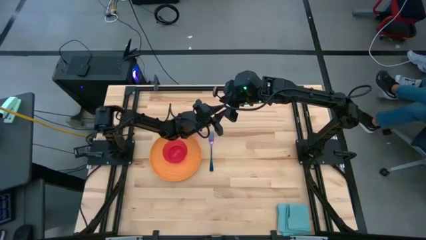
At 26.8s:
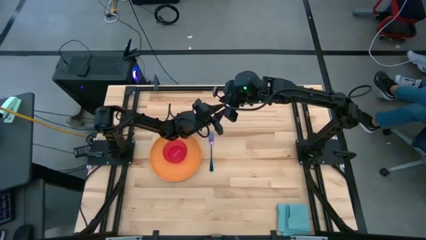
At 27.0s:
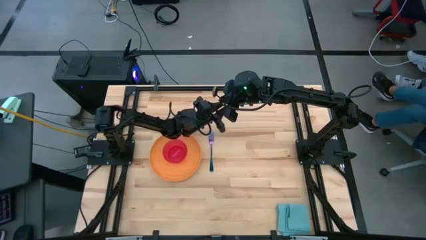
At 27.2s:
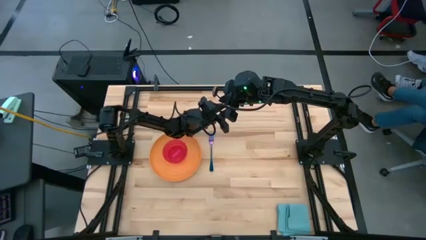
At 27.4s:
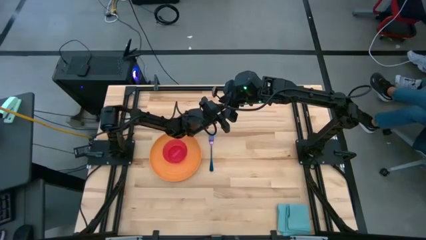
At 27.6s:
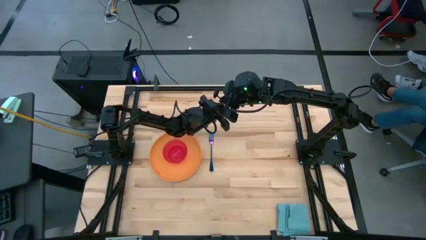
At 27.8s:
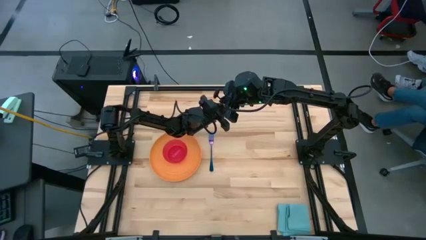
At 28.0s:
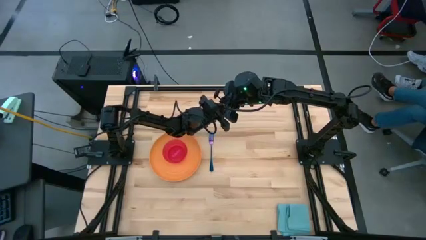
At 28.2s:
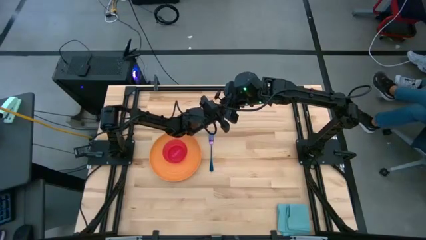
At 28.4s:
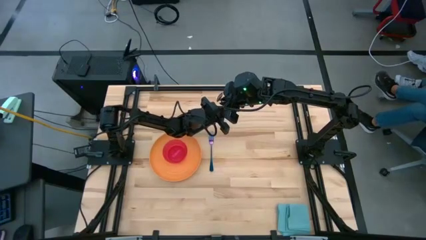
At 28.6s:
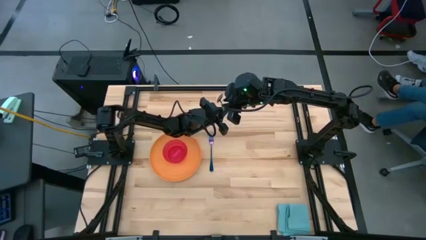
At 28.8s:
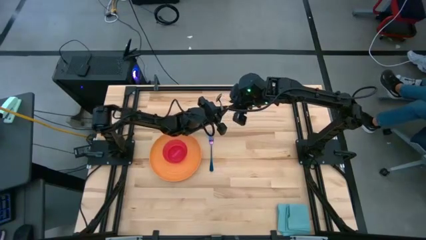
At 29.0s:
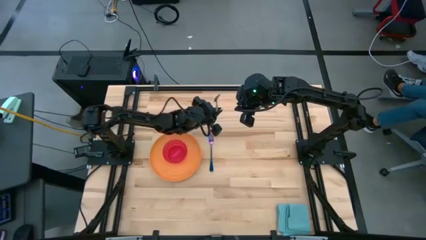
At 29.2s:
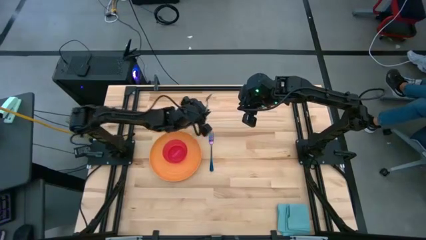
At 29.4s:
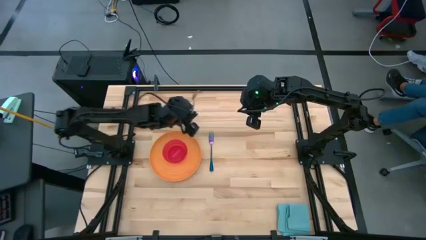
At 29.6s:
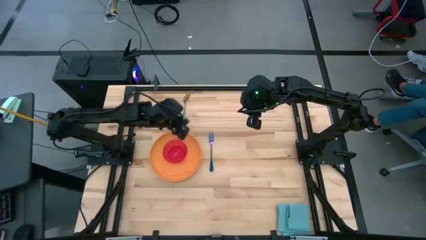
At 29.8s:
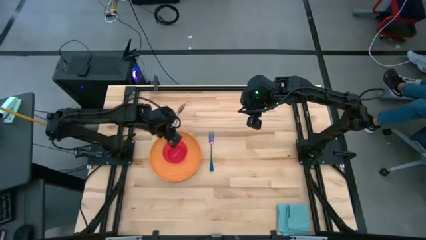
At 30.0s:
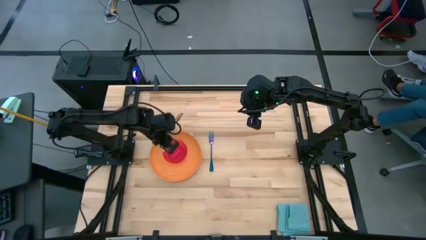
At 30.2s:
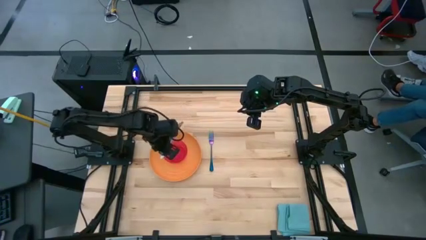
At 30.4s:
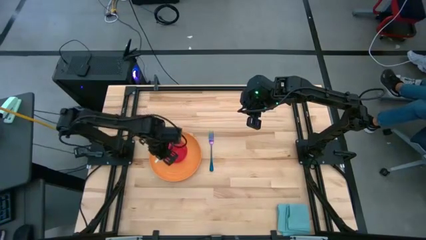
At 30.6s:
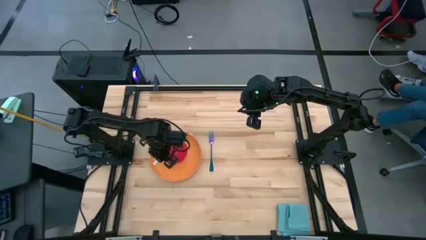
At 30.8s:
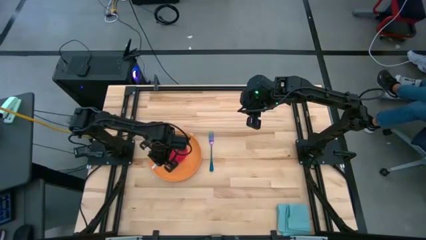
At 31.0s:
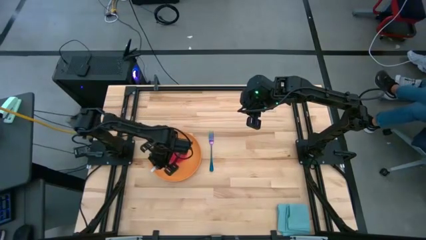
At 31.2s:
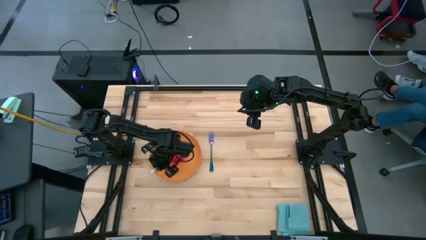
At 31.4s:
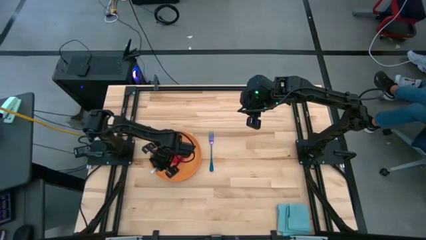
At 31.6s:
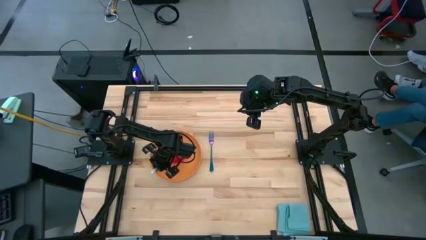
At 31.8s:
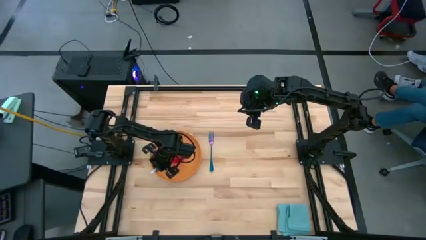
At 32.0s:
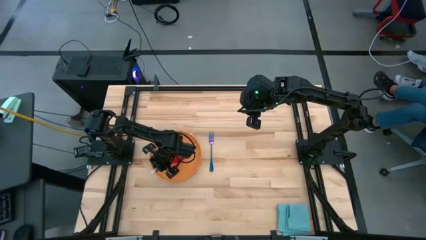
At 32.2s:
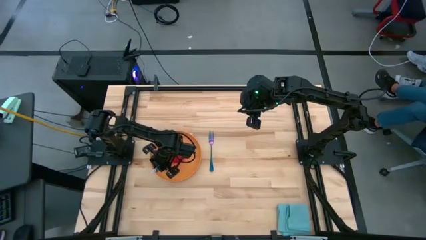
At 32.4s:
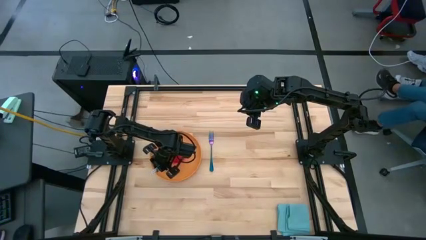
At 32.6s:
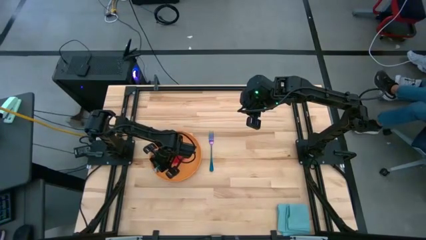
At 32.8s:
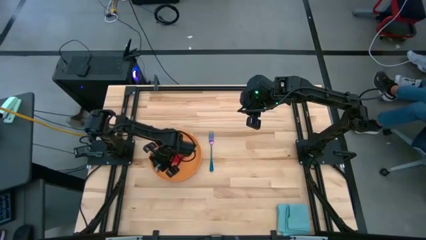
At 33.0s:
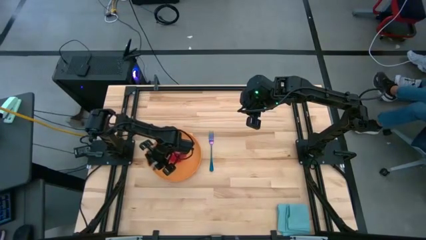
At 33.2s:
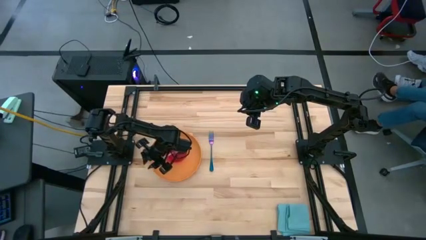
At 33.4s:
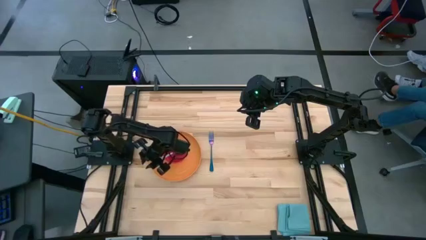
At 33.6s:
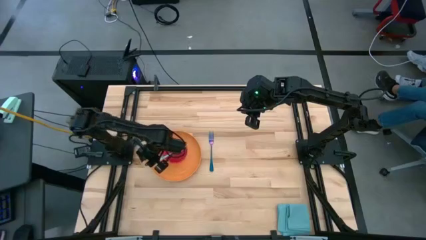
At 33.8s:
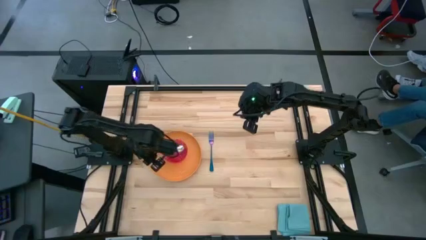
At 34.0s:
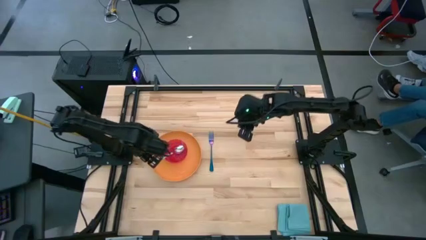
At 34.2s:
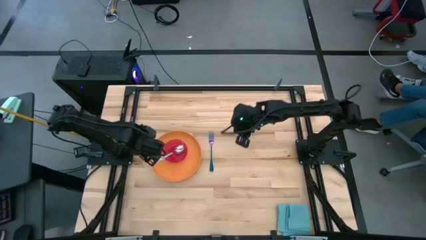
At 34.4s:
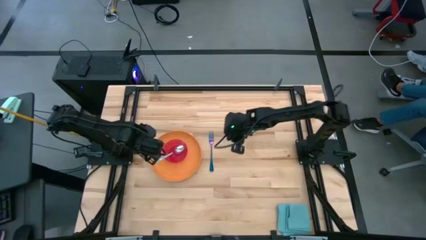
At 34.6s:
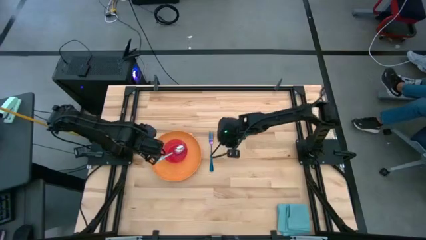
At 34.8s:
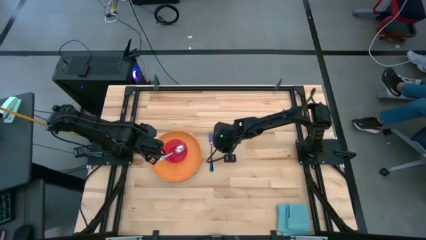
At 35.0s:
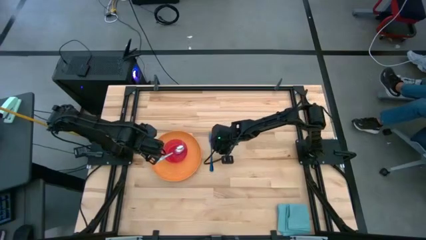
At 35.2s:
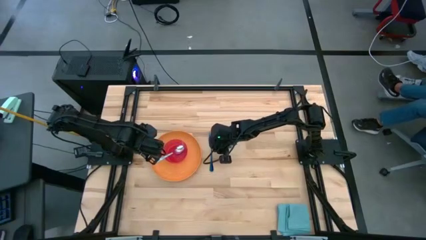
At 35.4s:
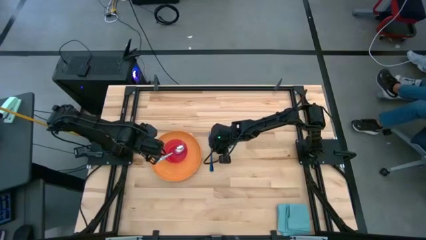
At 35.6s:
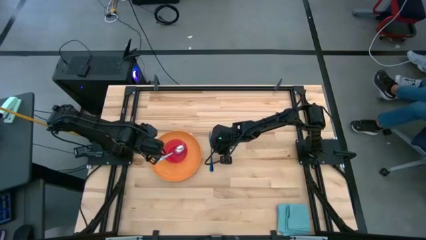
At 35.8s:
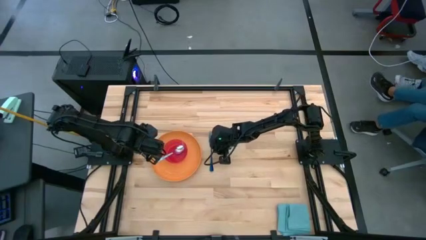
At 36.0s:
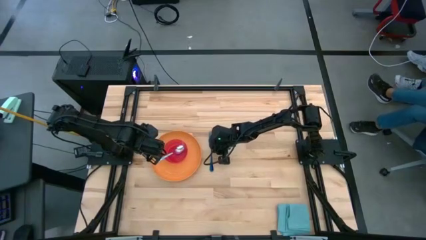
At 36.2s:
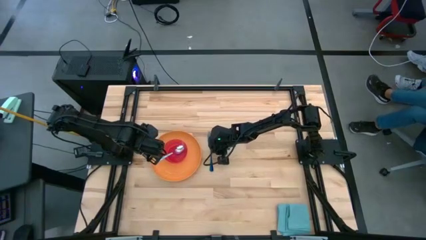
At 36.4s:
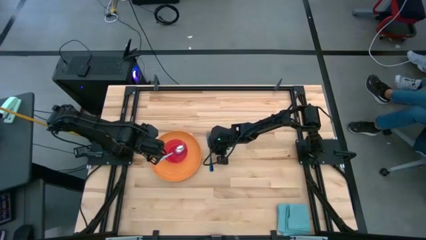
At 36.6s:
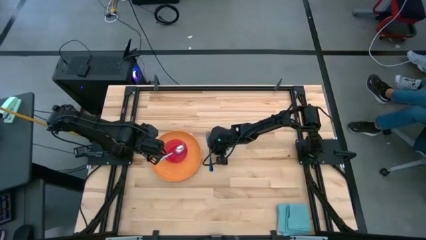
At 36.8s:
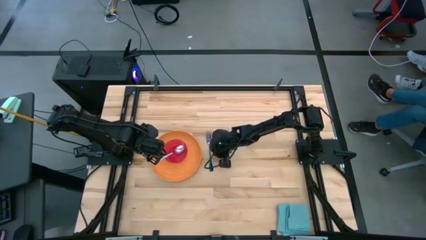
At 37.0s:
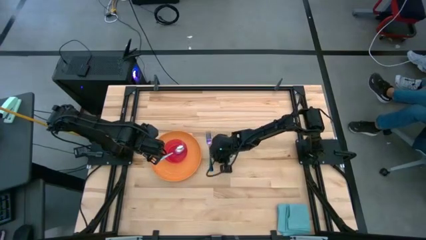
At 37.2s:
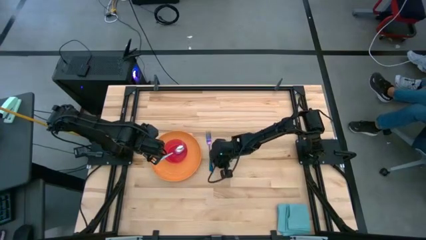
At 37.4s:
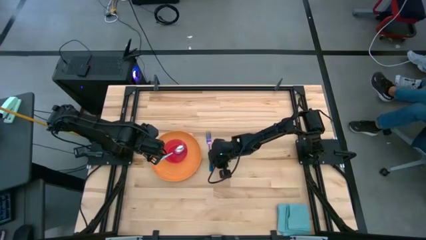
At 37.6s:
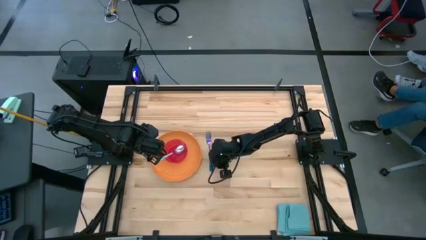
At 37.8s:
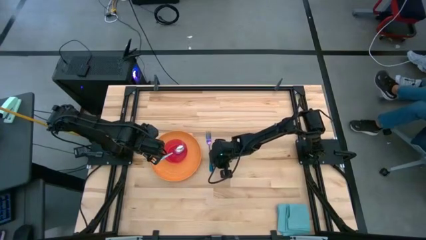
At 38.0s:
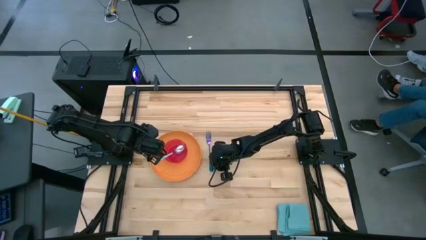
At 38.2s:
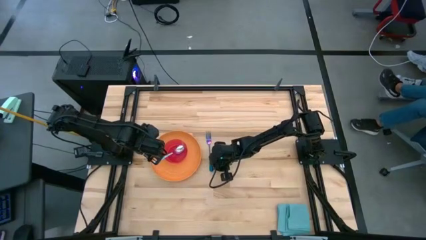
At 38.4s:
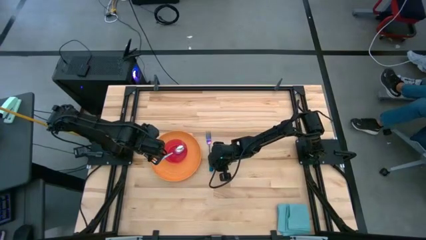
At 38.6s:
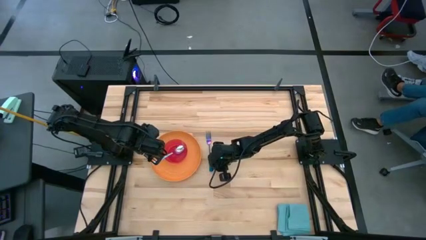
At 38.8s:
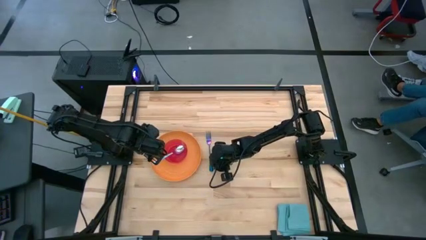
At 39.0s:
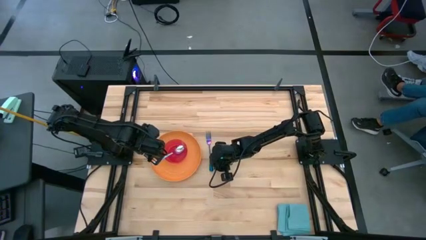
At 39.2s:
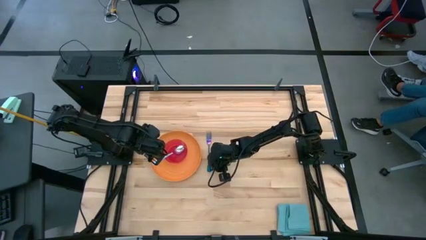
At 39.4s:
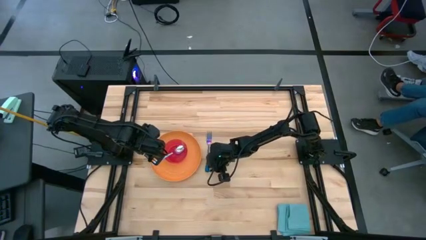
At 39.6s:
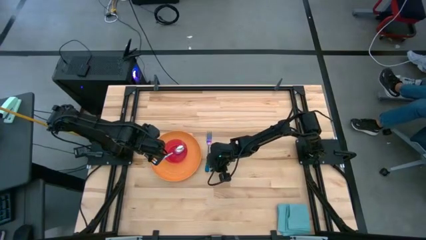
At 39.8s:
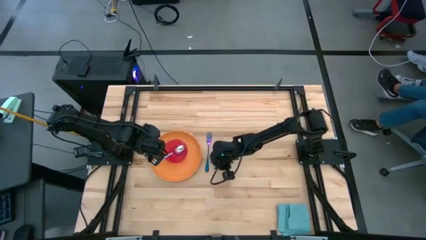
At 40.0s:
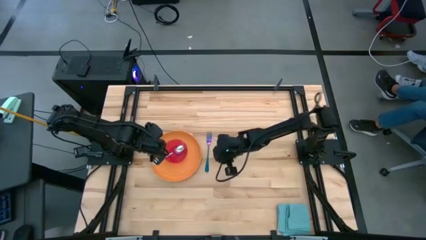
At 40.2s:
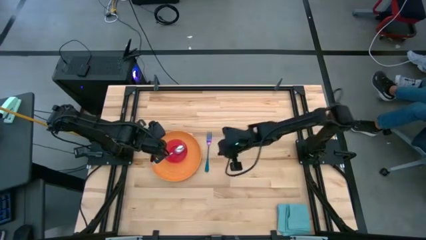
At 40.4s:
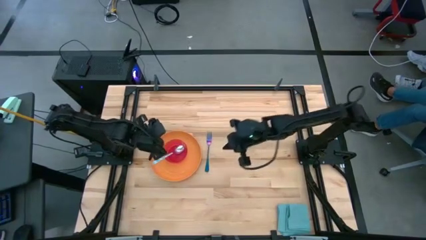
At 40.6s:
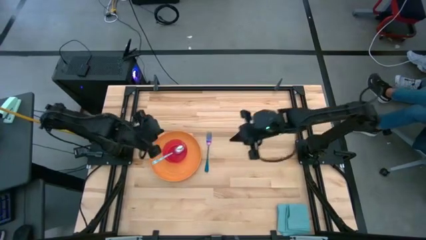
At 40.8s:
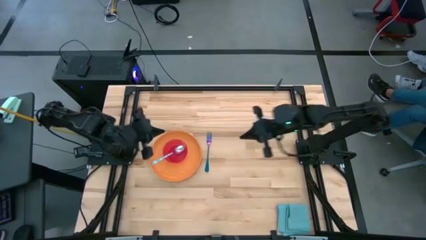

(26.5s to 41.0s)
Task: Set table place
Place the metal spoon into the pink bowl

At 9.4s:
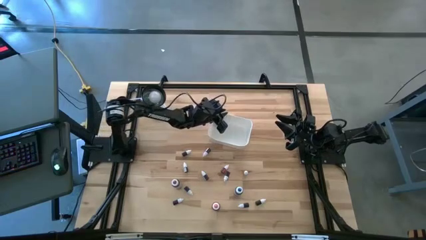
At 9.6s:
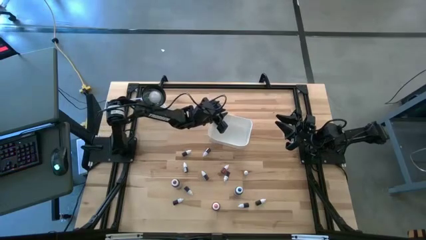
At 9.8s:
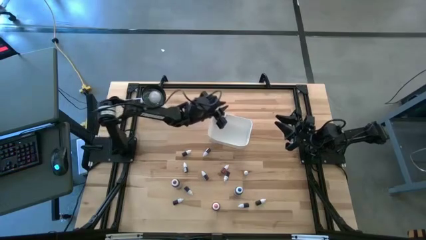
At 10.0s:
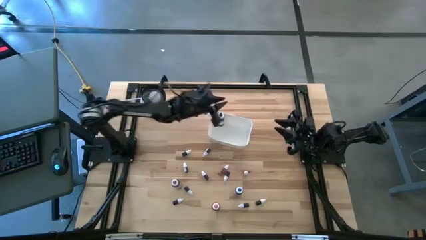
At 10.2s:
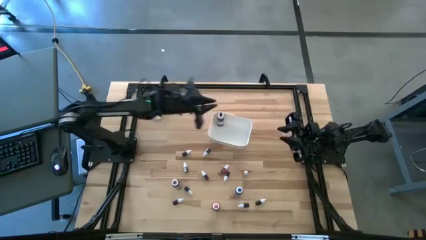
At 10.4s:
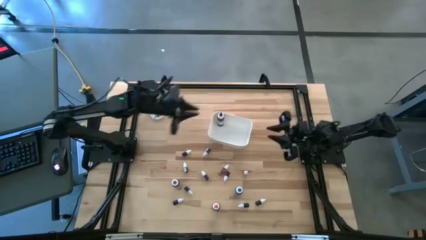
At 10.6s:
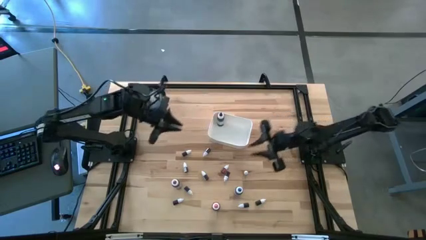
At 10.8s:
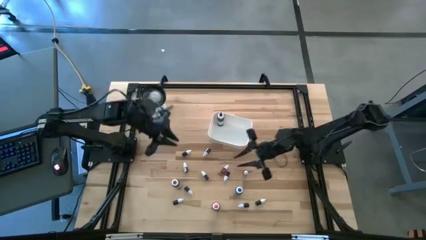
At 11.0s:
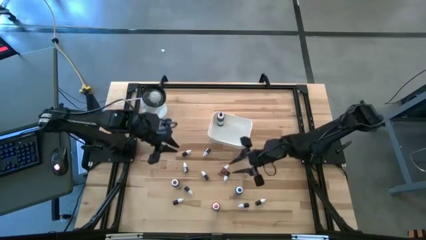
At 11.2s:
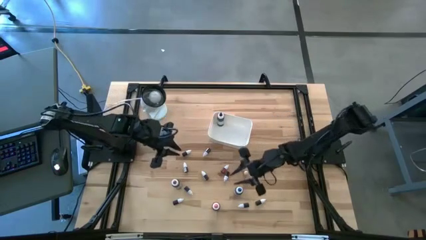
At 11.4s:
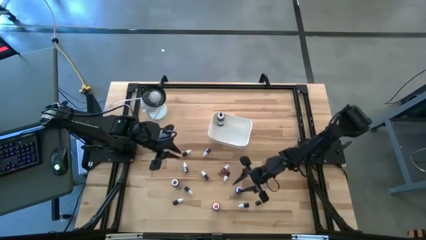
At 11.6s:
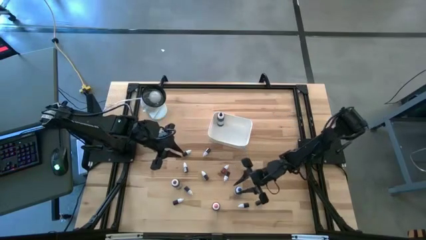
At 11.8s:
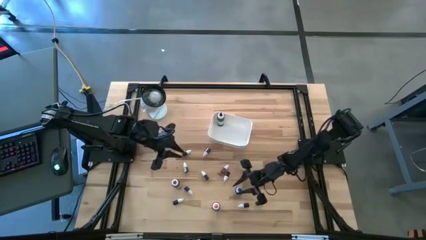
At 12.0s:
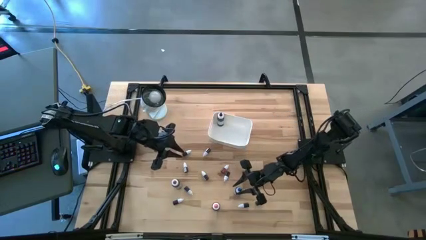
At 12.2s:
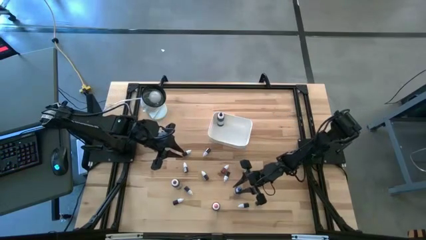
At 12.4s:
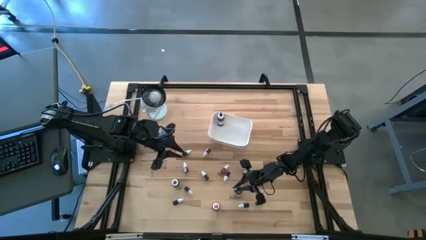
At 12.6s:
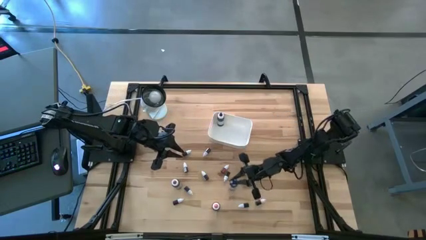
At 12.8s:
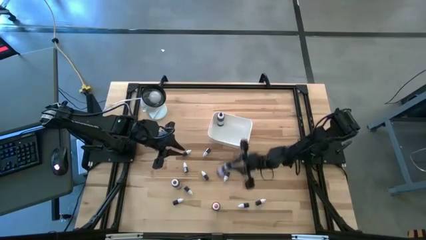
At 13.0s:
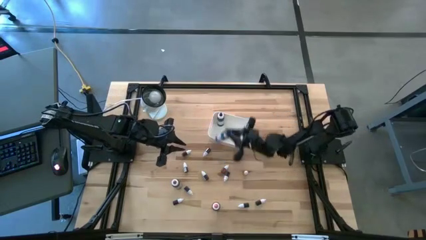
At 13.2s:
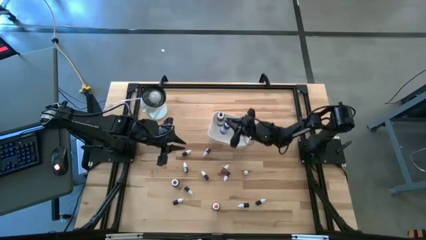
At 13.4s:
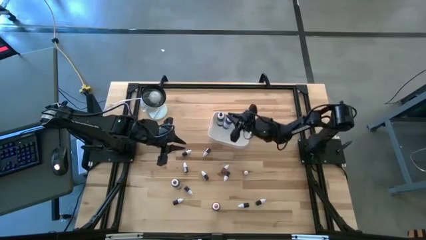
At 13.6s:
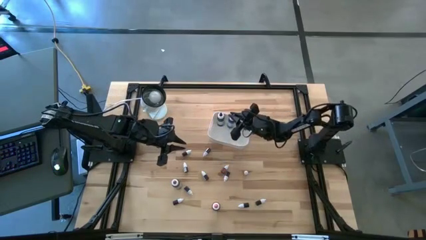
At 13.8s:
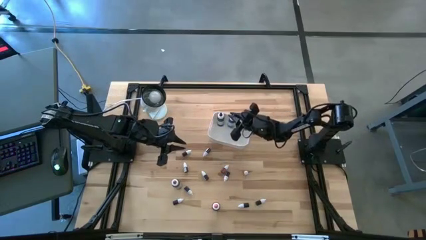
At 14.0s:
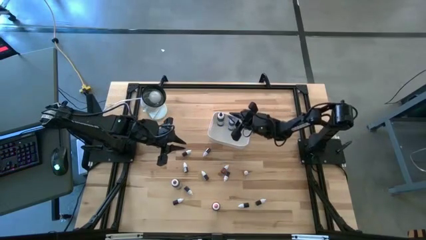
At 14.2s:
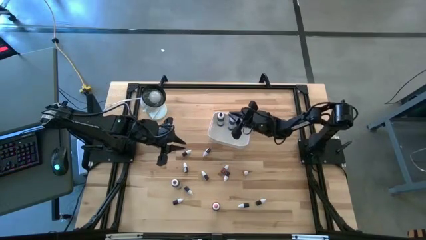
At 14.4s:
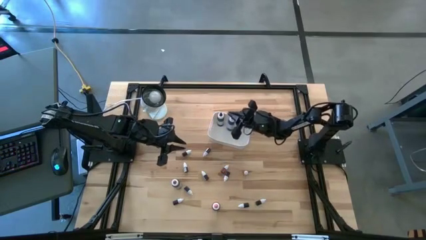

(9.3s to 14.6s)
Task: Pick & Place food coloring
Put the big blue food coloring bottle into the white bin
